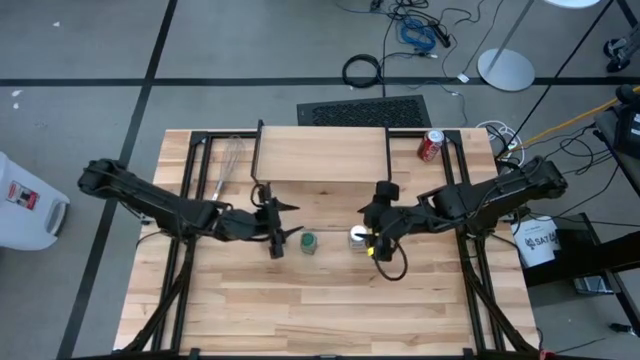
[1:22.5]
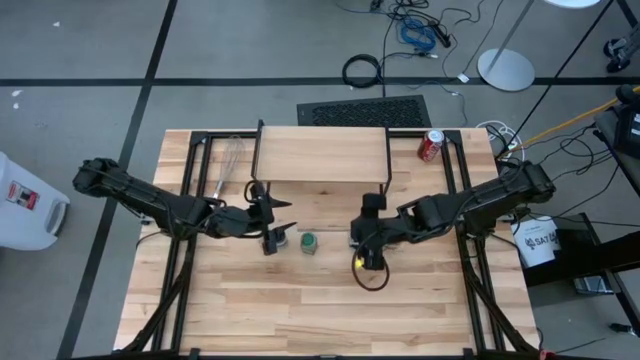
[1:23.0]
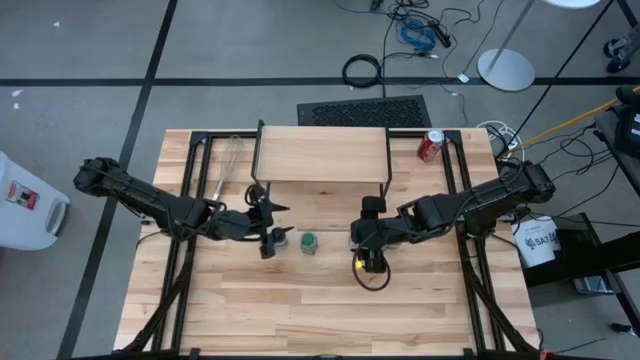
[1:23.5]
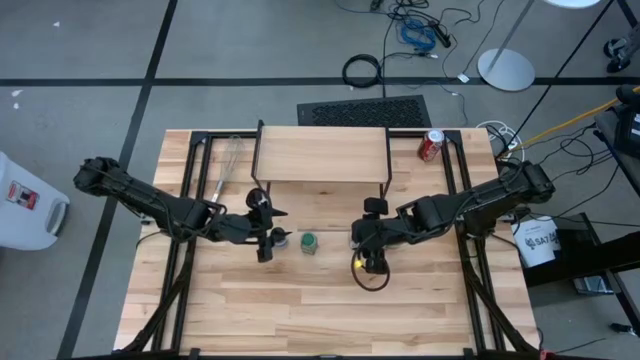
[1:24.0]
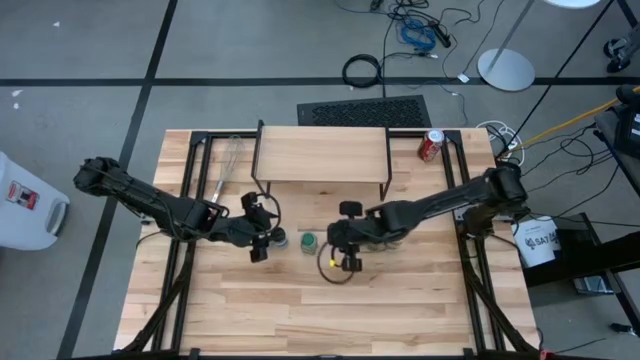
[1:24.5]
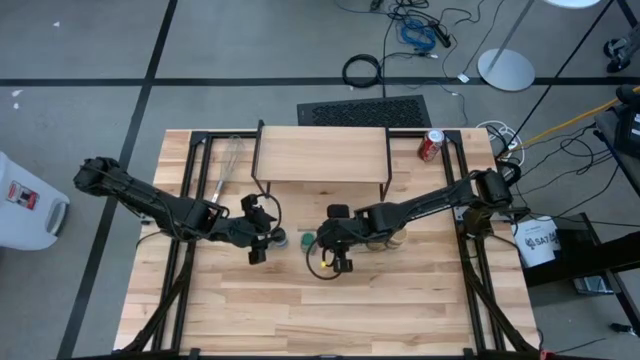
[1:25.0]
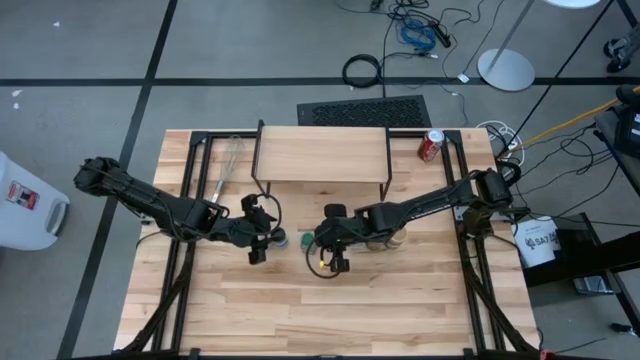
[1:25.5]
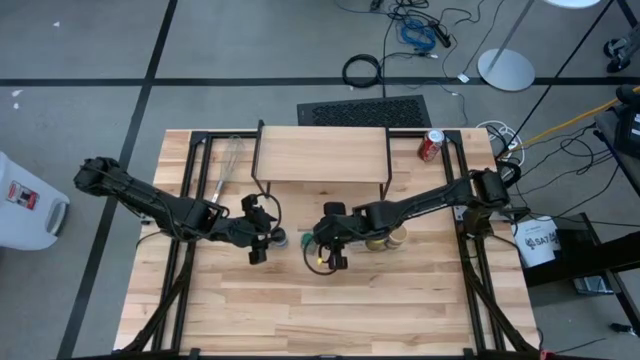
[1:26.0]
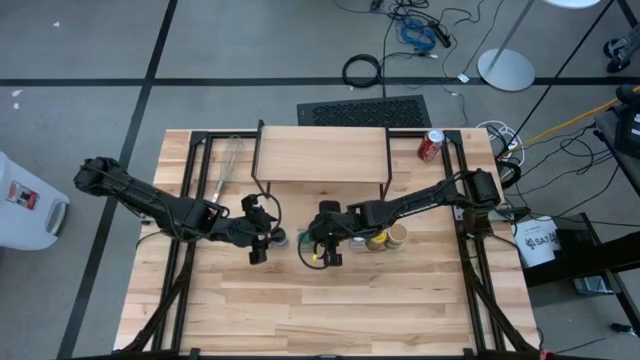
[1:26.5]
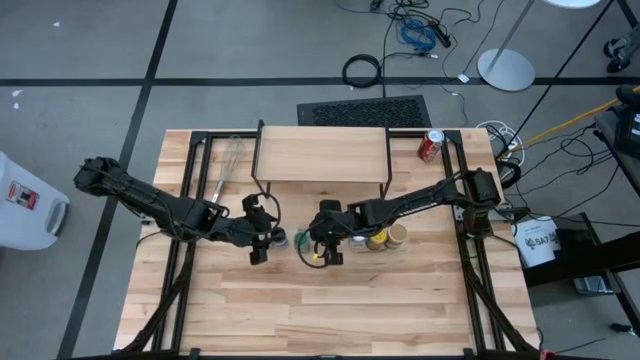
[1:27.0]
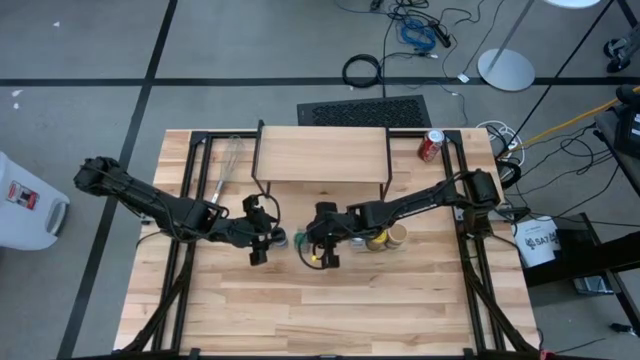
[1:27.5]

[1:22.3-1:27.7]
Task: Shelf spices
Adjust the seasoning bottles on the table

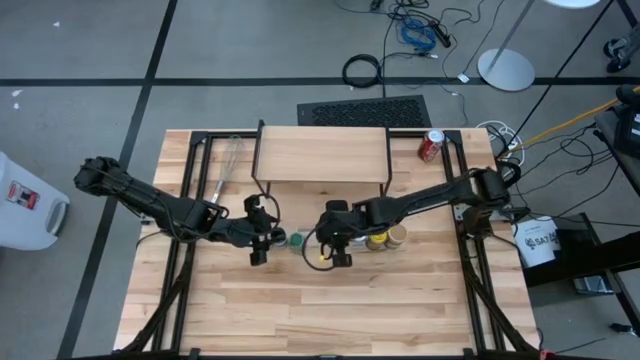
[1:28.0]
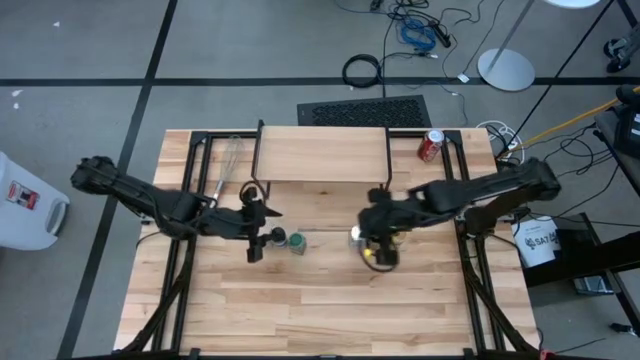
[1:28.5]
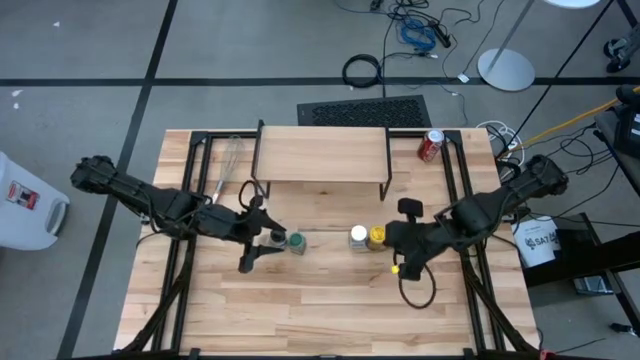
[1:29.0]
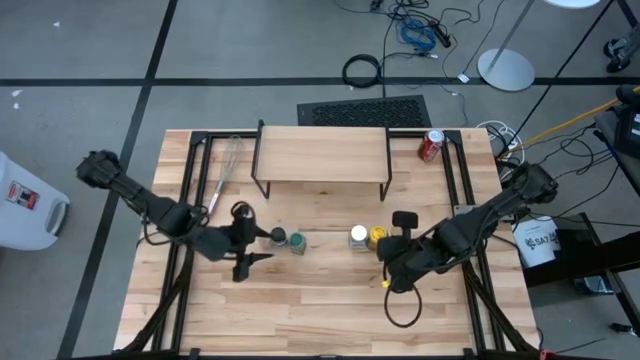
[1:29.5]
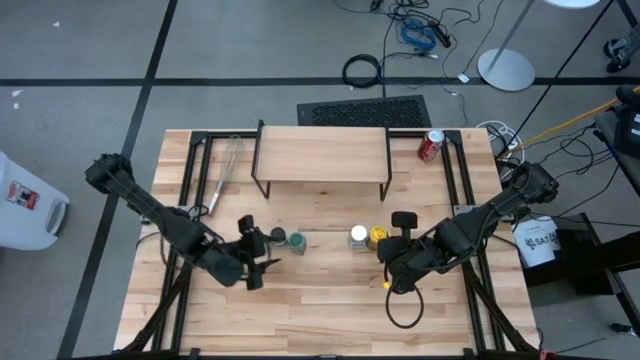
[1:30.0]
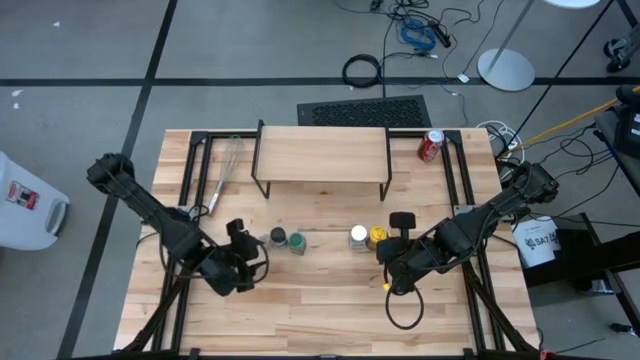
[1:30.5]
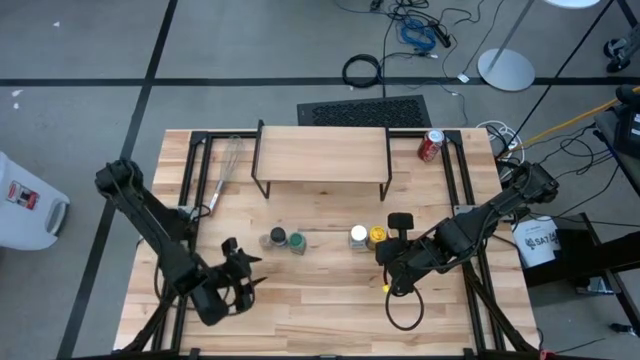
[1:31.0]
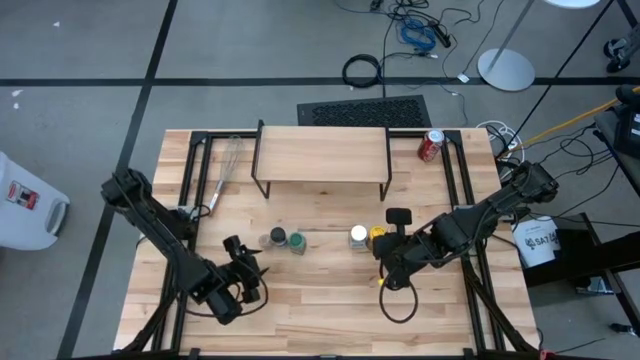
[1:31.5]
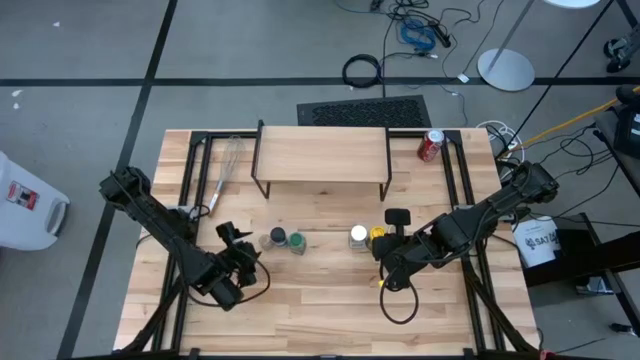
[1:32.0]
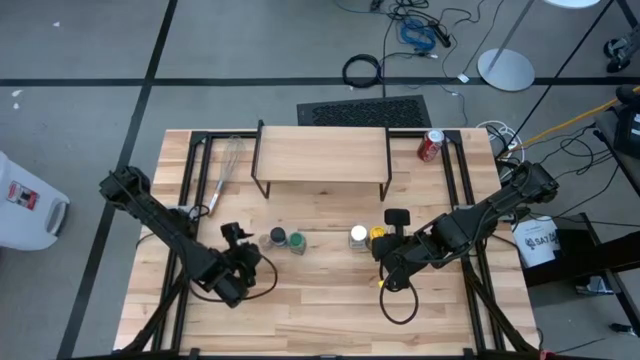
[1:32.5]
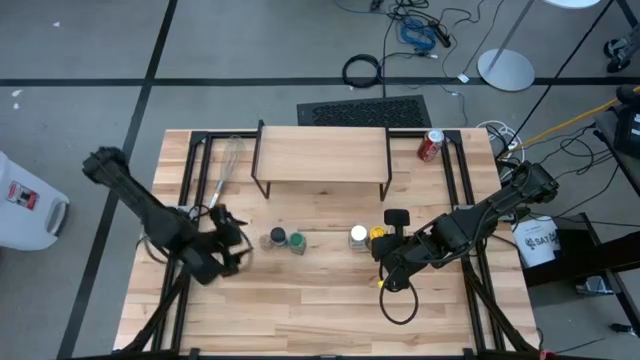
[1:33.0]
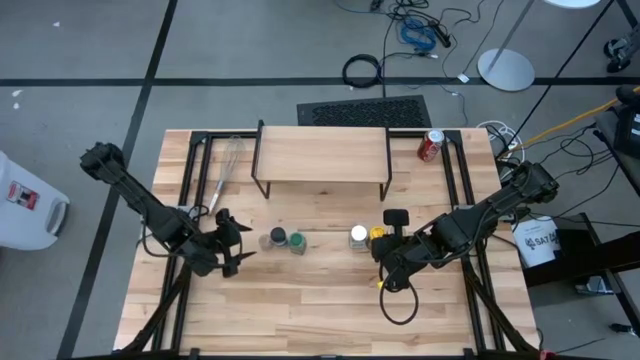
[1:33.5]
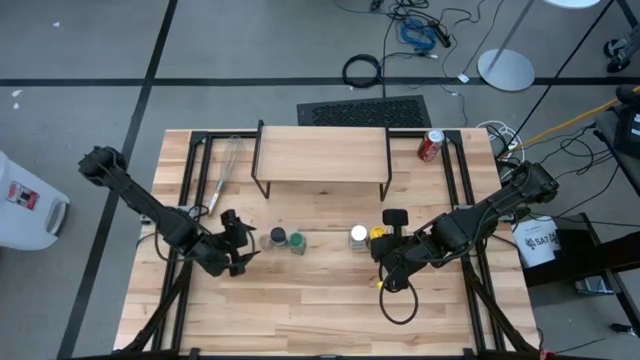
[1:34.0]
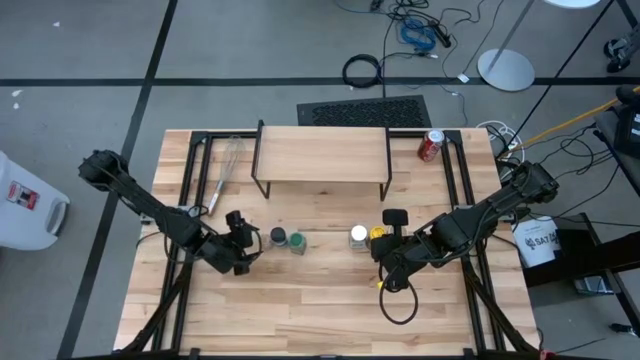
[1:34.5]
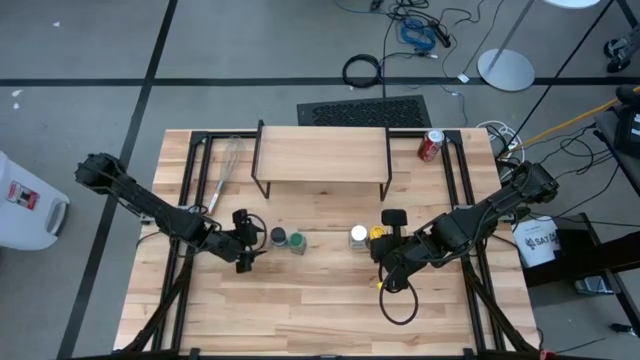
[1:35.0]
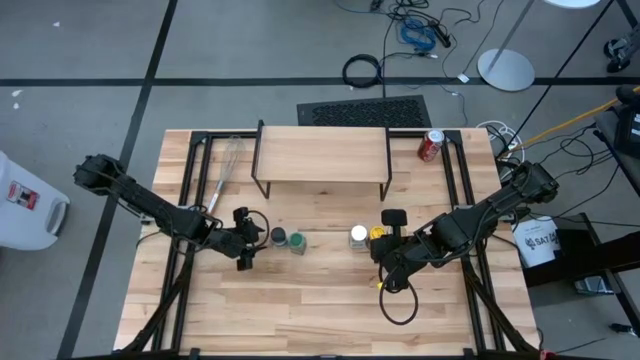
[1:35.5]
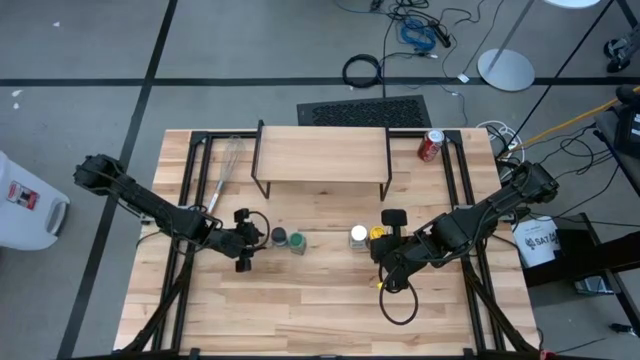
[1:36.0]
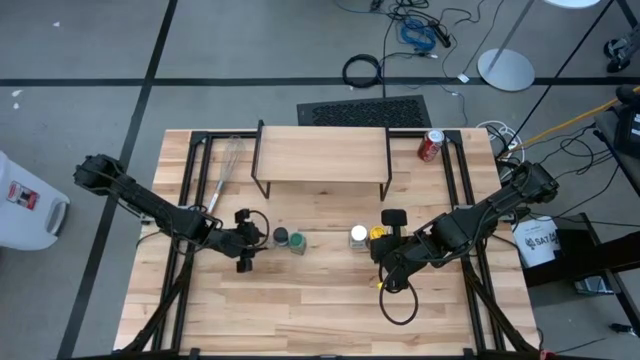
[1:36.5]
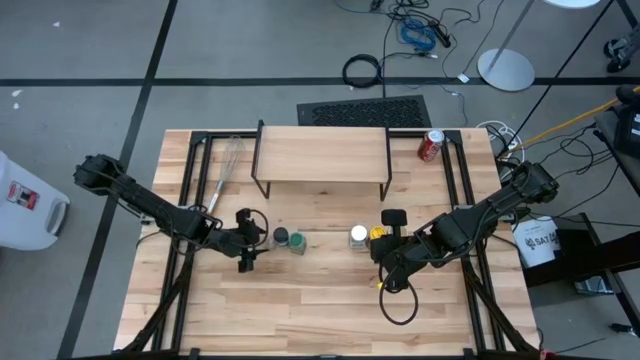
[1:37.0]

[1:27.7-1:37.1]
Put the brown seasoning bottle on the shelf

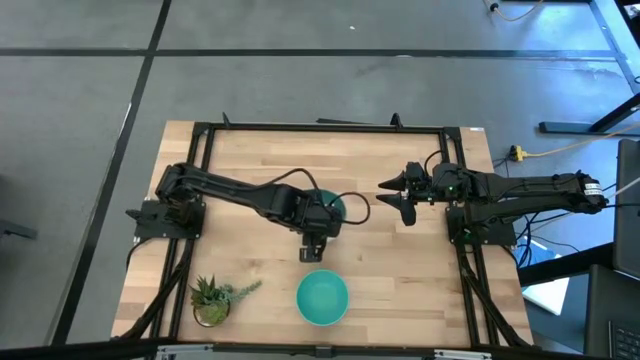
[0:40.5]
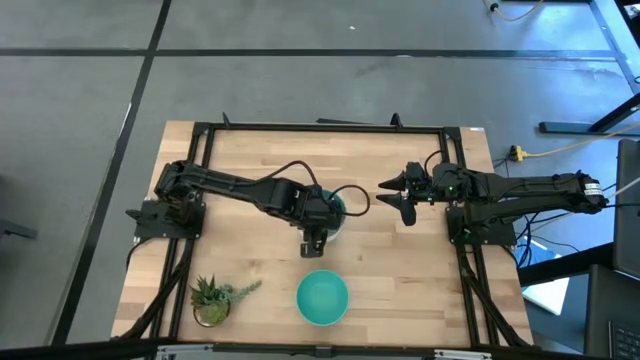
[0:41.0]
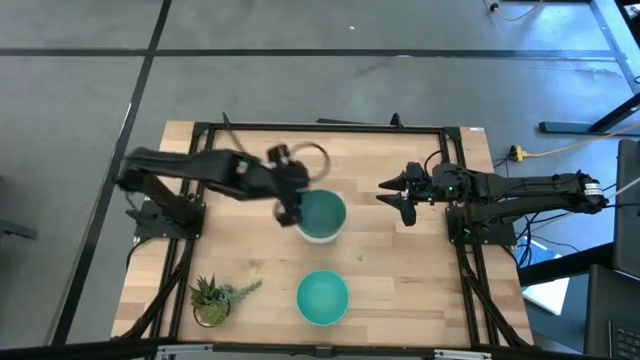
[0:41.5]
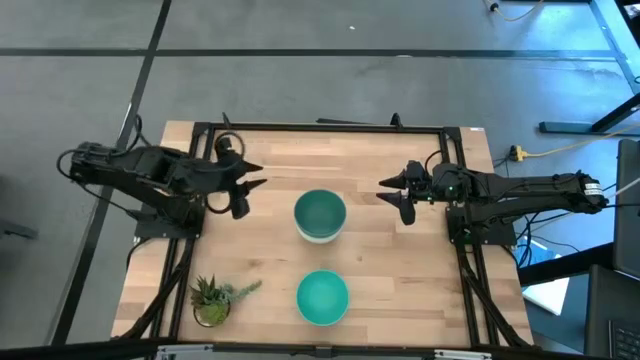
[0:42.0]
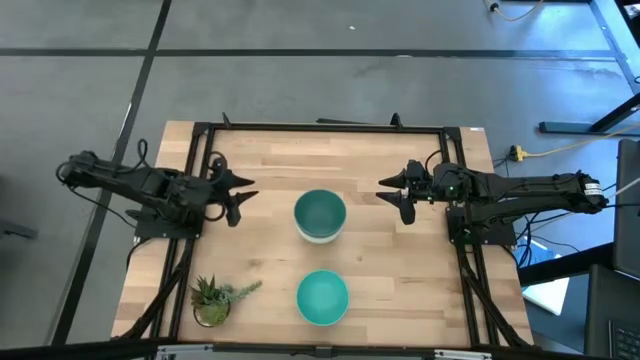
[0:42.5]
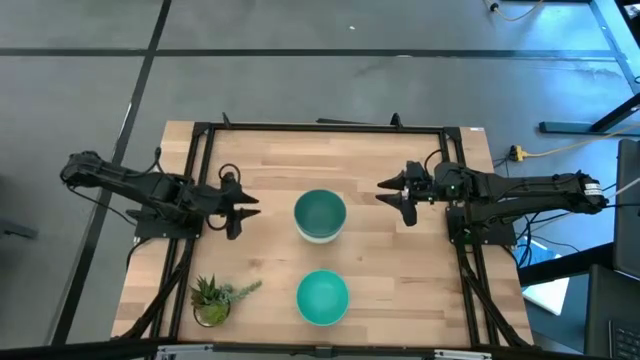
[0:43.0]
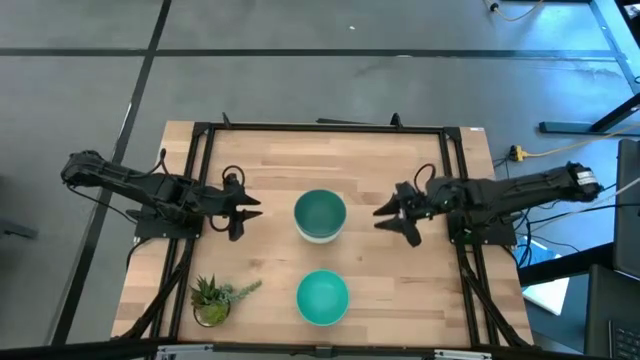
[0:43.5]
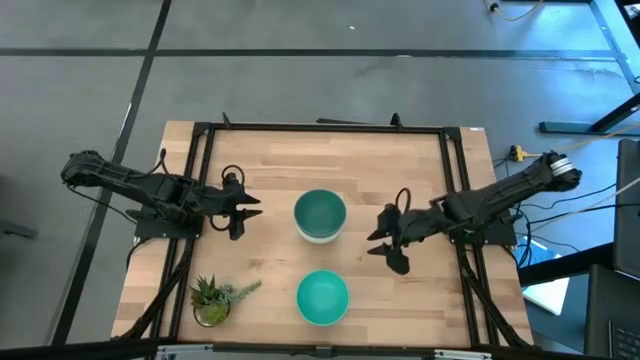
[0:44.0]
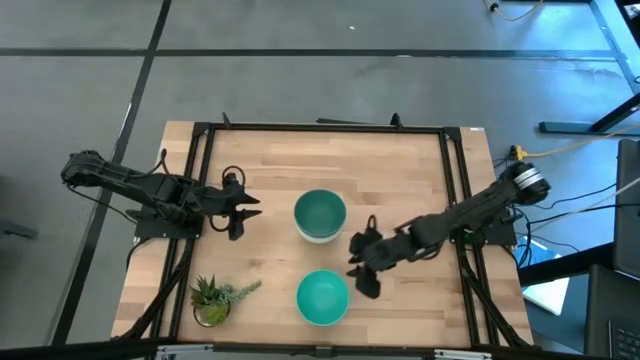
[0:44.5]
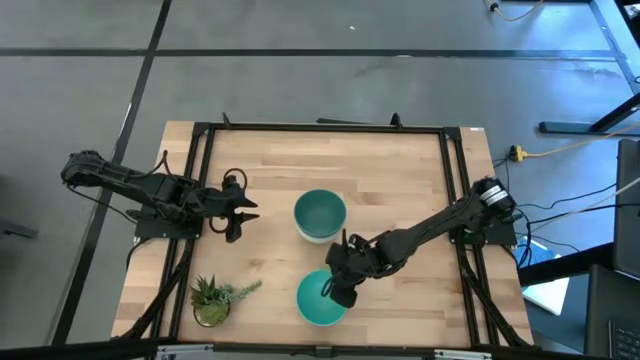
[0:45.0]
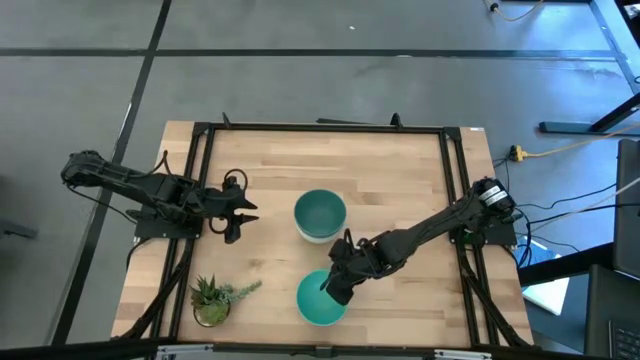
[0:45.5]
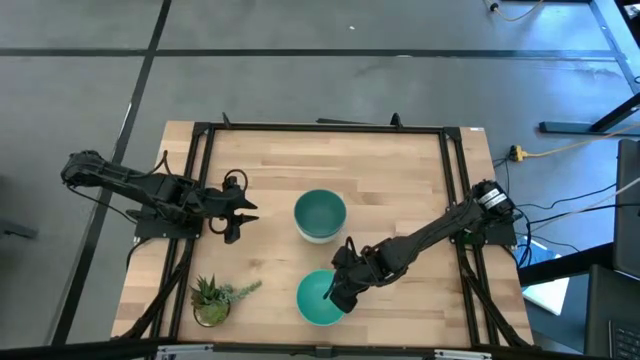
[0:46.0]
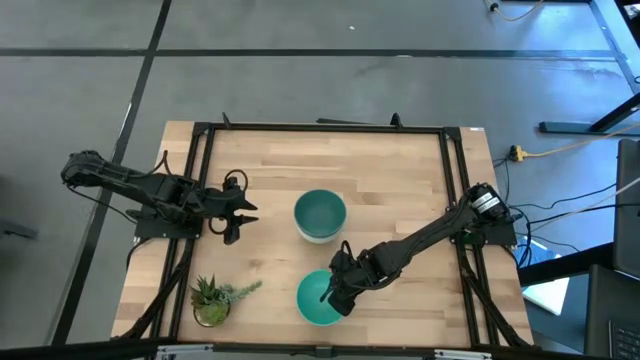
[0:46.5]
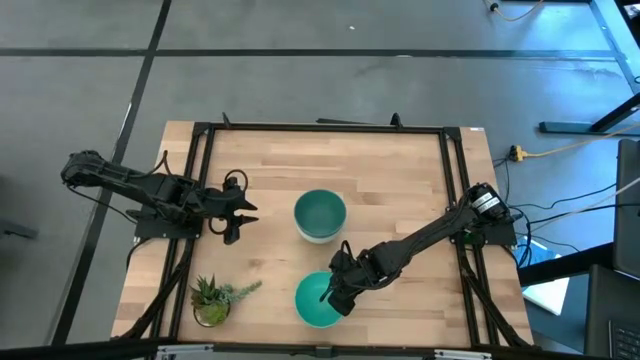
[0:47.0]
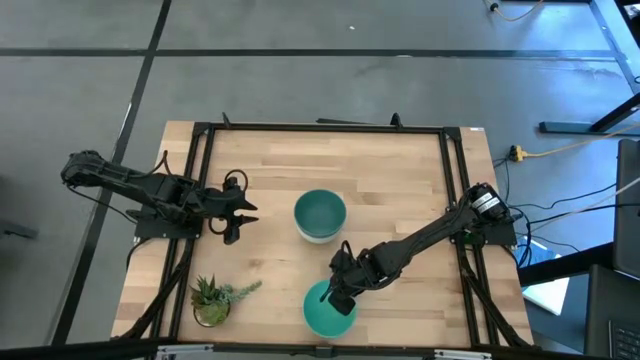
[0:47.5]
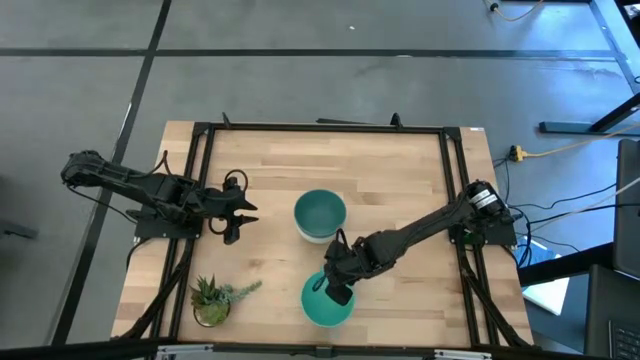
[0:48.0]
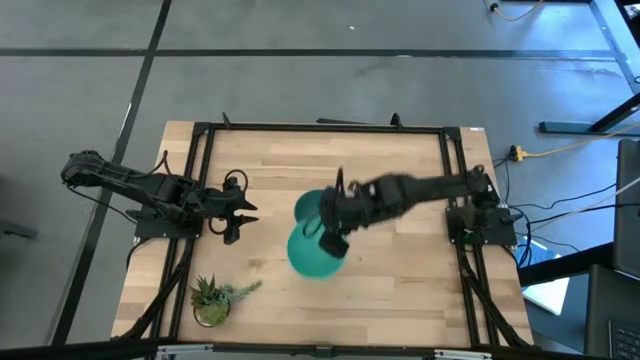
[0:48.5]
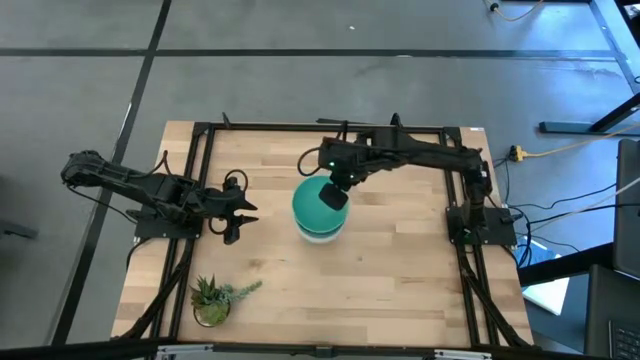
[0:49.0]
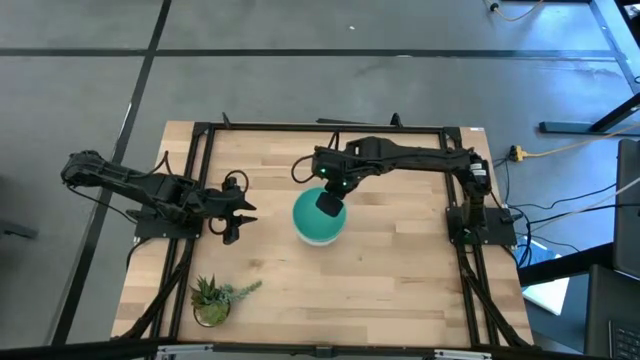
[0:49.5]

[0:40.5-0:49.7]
Task: Nest bowls inside each other
Stack the light blue bowl on the blue bowl
